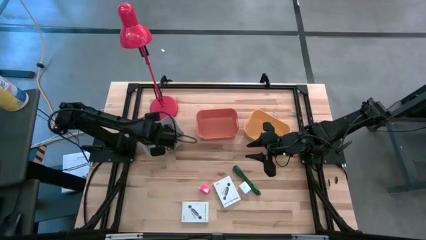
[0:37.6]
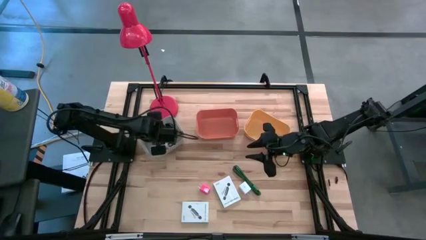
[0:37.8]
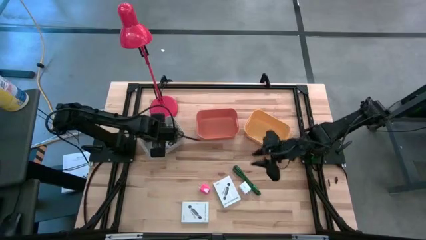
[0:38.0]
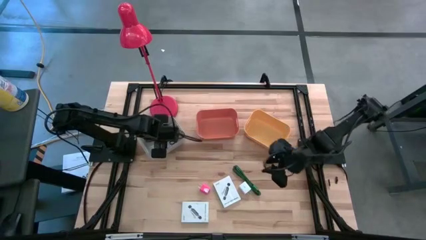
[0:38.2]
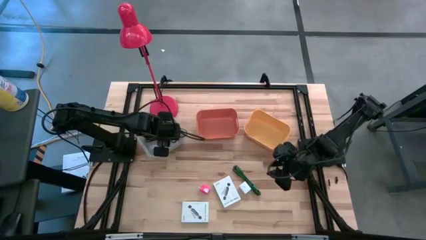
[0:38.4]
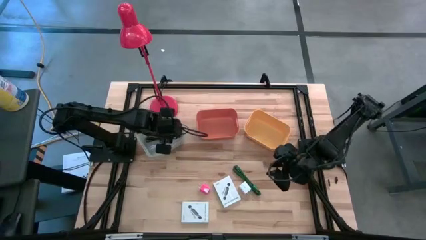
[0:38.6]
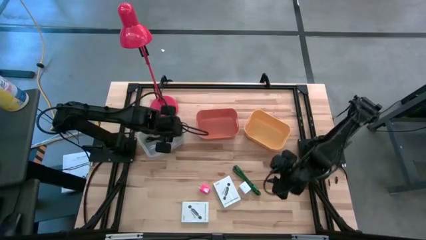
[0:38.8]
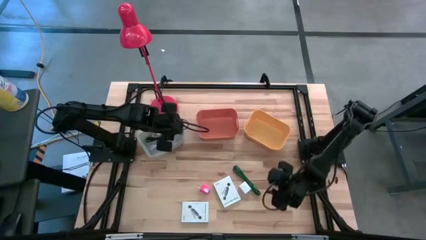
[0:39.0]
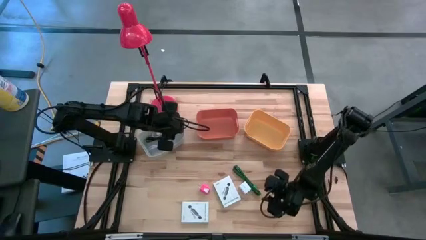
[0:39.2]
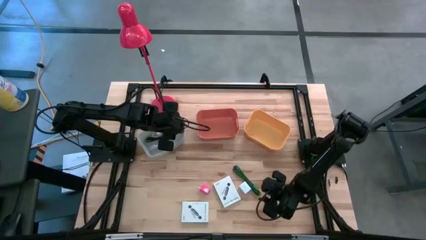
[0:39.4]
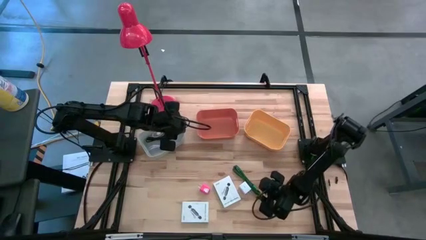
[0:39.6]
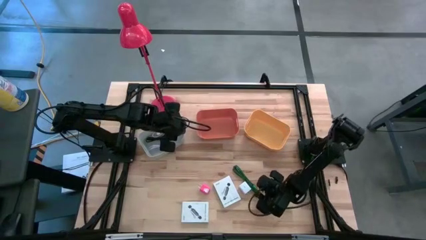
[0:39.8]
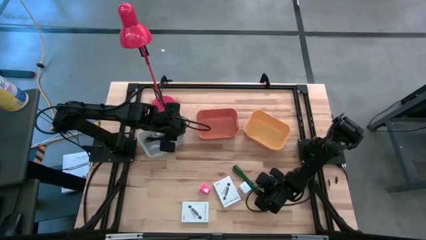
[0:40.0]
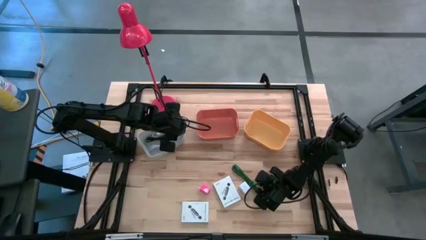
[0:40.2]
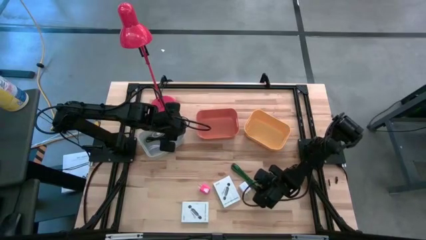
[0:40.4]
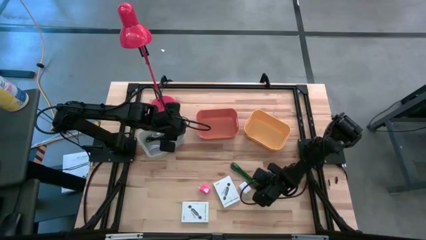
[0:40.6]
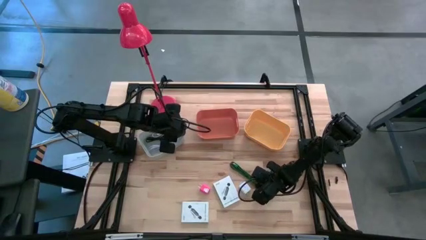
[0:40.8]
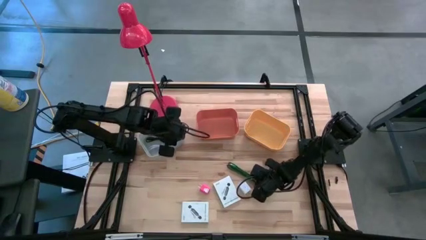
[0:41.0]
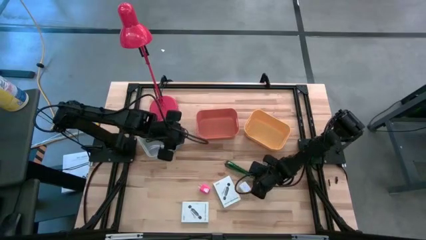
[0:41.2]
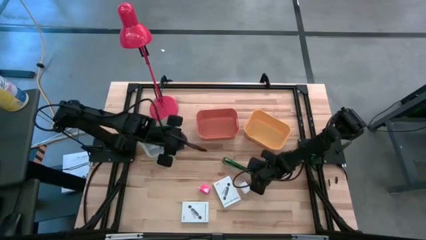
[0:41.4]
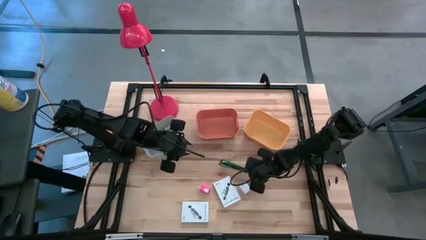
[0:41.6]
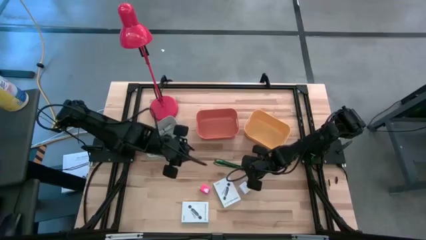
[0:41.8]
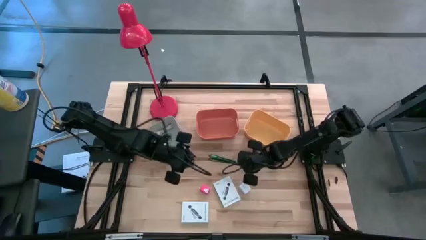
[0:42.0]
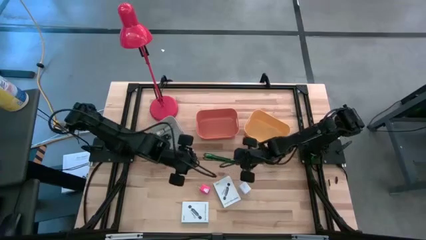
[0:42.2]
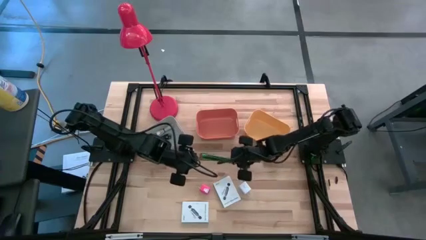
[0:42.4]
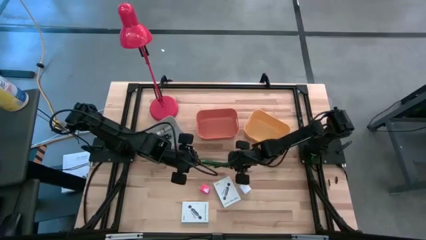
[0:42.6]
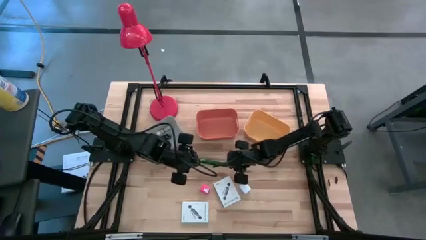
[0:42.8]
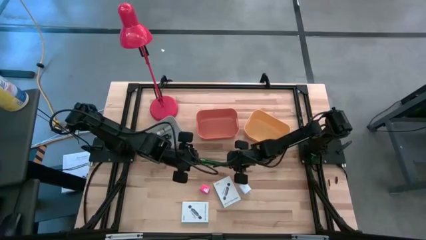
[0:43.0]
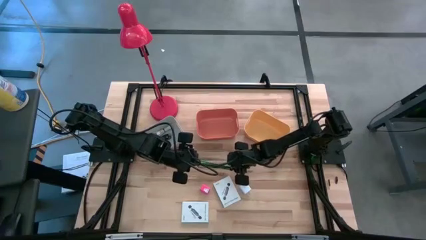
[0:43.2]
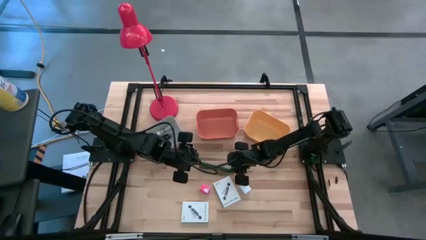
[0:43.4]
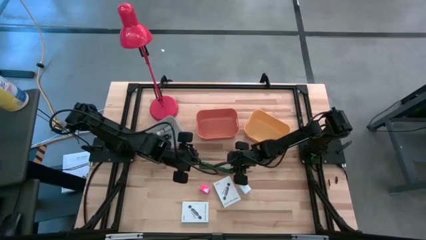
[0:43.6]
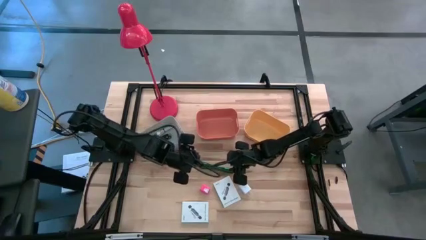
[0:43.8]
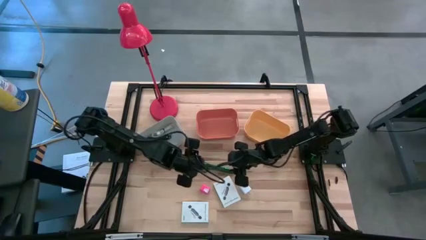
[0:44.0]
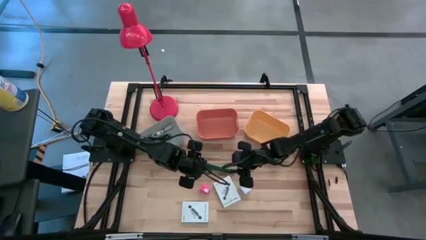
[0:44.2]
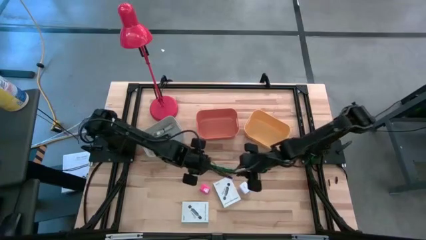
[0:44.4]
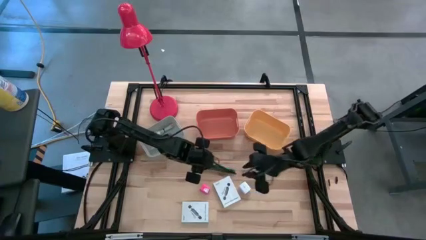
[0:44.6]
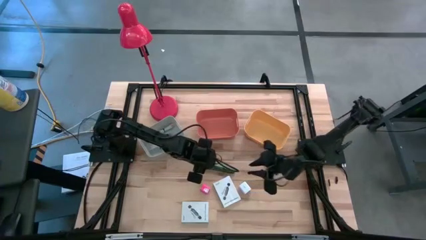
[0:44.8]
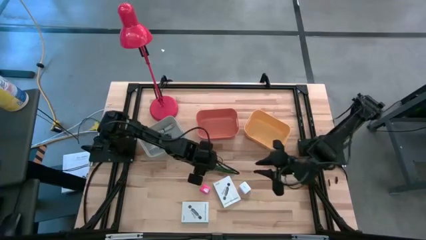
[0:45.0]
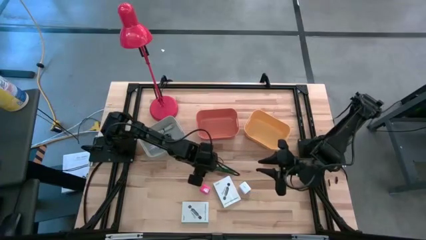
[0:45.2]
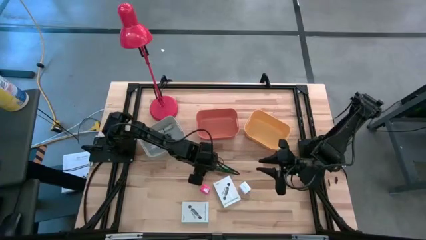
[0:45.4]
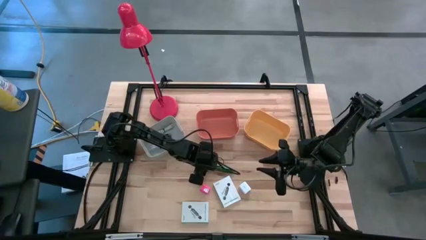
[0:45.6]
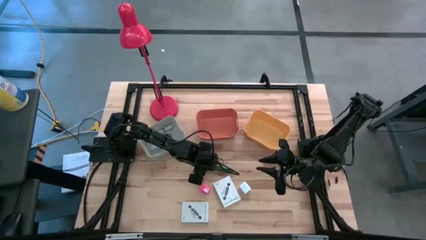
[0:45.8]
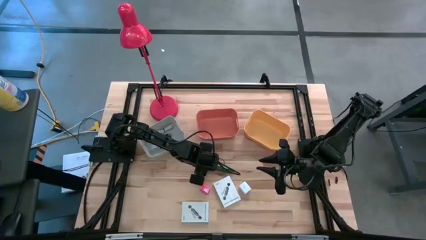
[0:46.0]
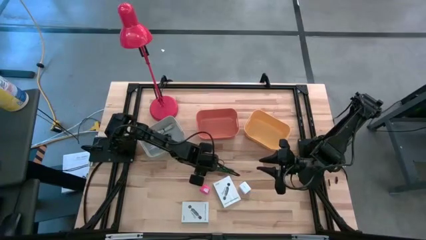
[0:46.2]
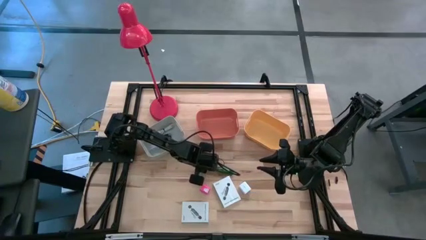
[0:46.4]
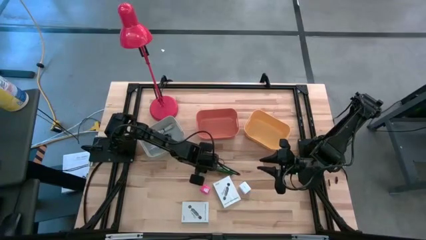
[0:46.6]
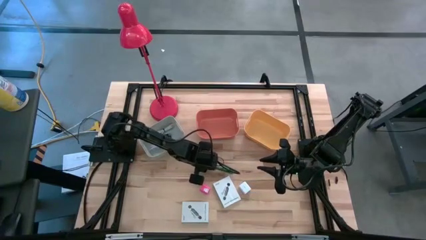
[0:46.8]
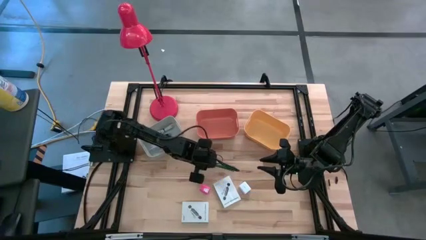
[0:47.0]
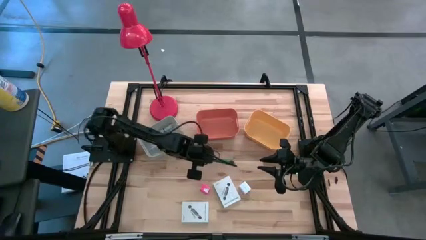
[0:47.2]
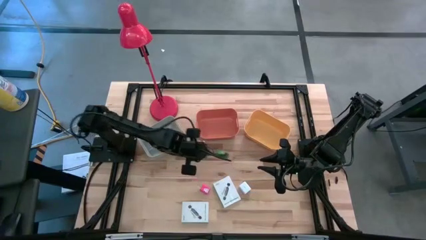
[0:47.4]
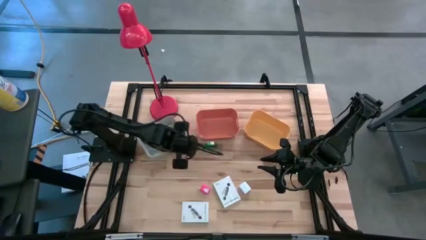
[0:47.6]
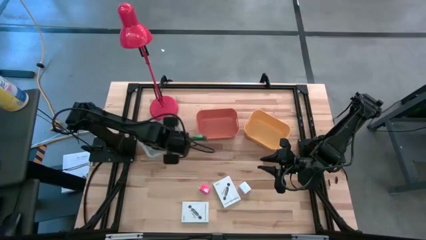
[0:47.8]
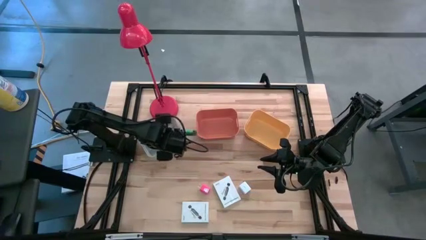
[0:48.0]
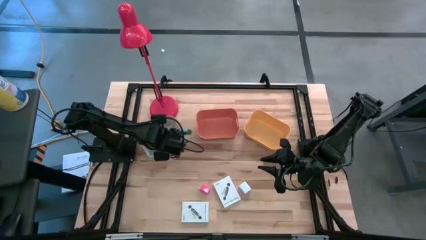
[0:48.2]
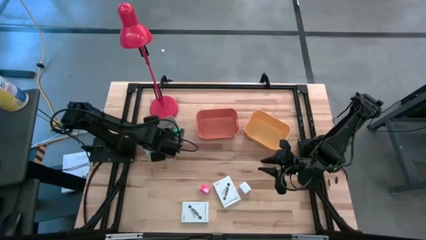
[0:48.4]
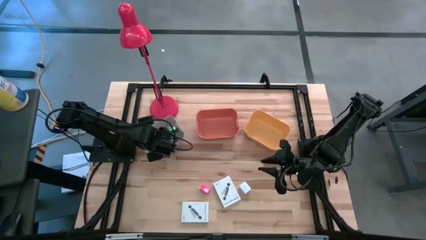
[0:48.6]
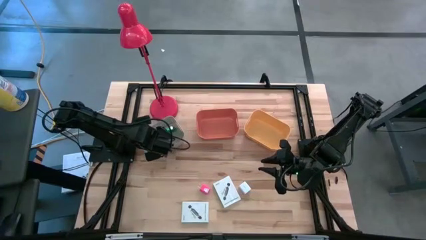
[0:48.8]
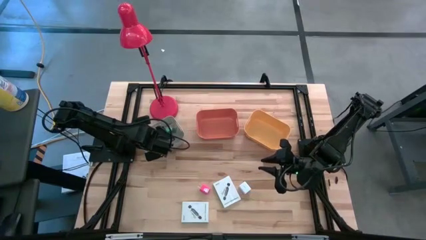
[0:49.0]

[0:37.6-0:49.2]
Task: Pick and place items into bin
Put the green charger cable into the gray bin

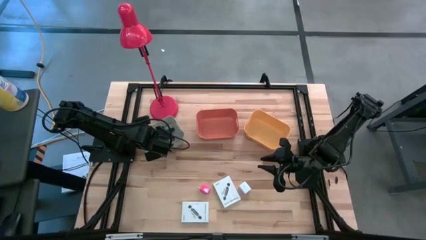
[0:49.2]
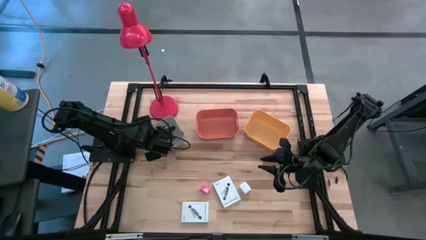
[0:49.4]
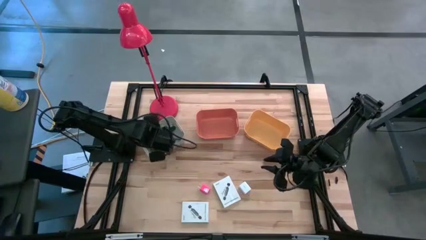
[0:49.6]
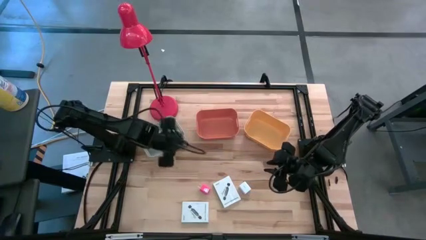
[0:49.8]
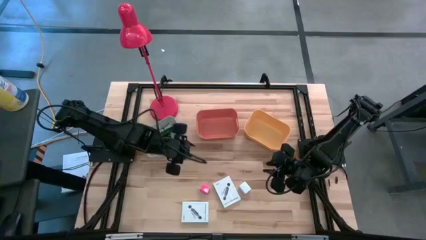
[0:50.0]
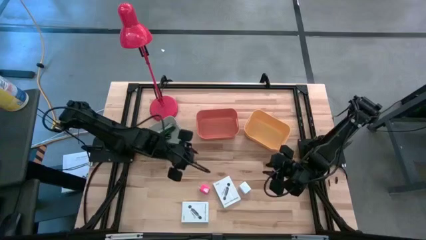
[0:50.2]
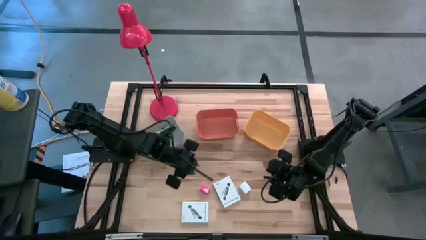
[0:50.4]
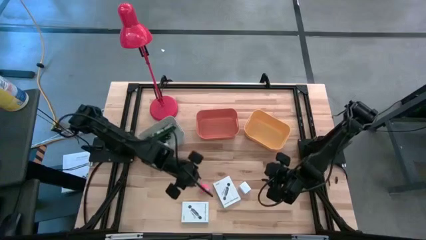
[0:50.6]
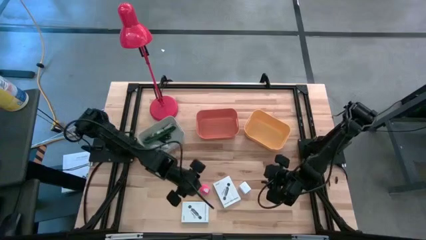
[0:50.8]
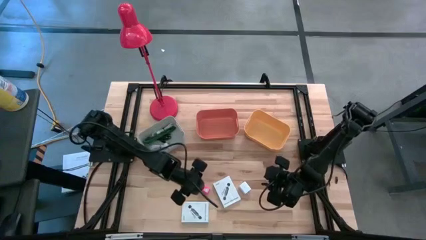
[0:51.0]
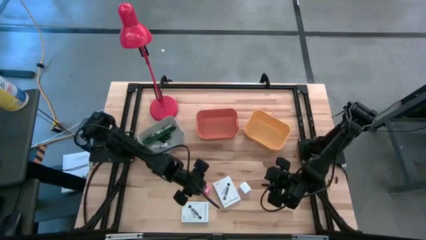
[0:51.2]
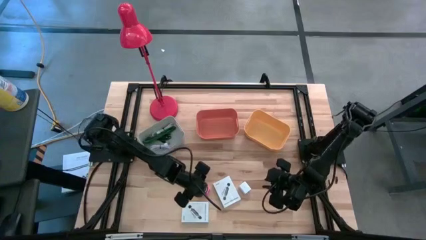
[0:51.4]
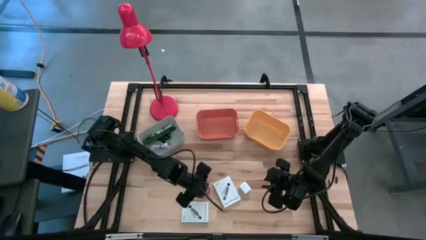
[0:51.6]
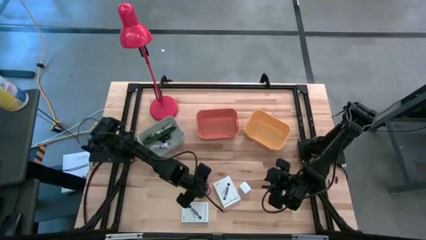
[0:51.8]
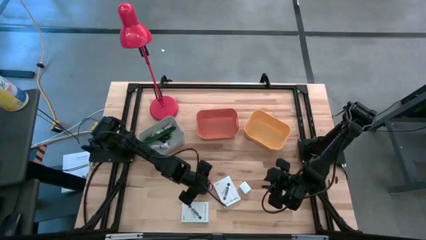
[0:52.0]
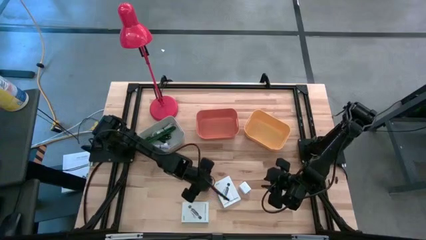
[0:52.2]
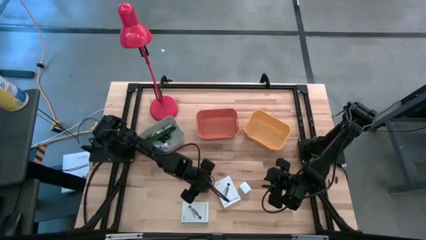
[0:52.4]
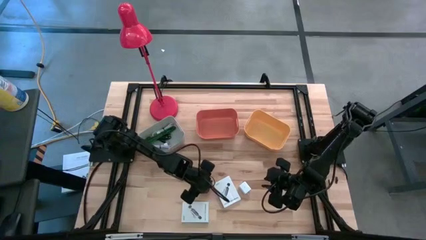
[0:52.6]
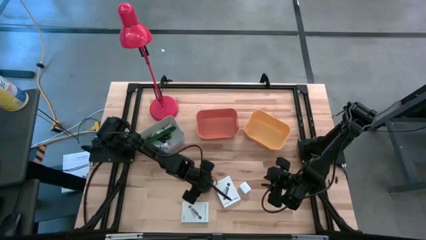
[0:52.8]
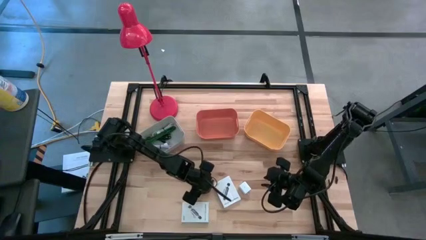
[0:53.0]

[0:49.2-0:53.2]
Put the pink charger adapter into the orange bin
